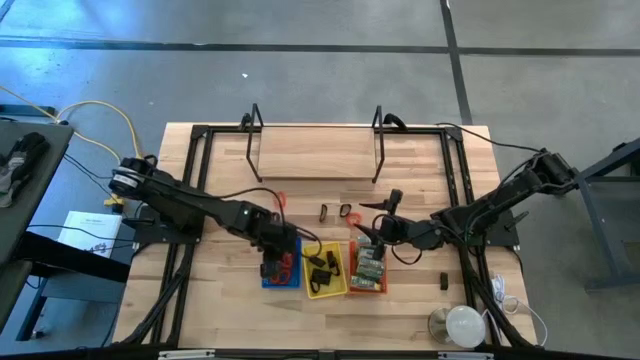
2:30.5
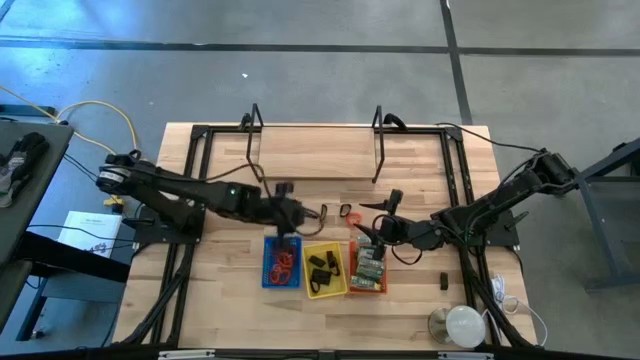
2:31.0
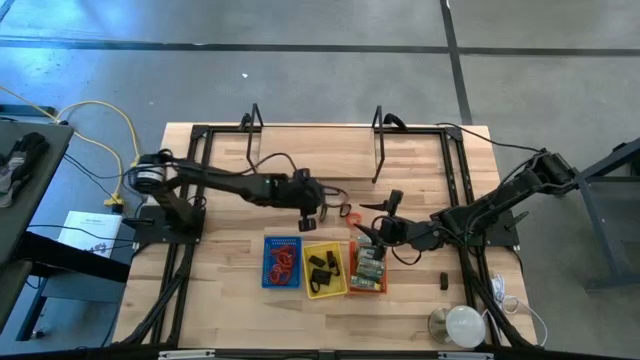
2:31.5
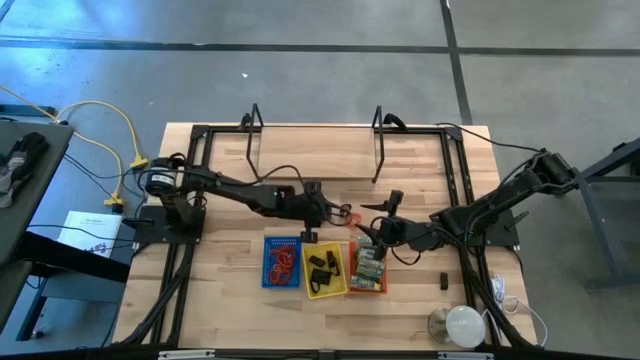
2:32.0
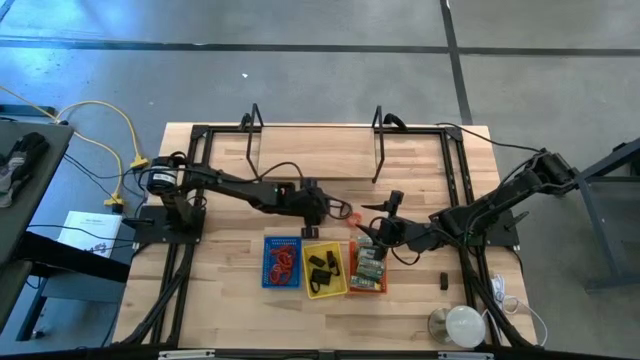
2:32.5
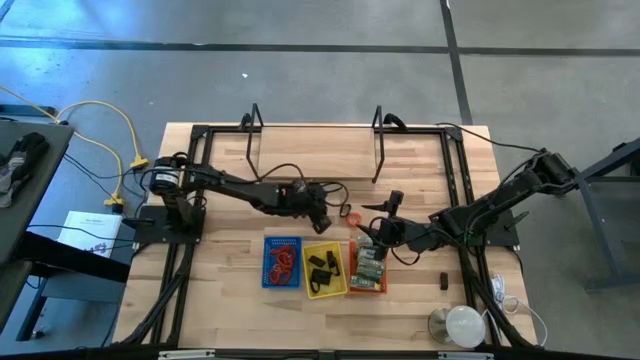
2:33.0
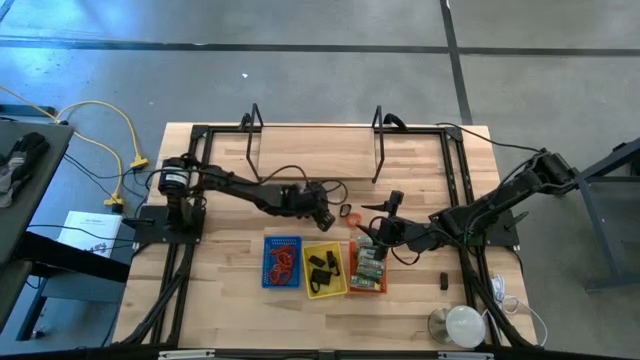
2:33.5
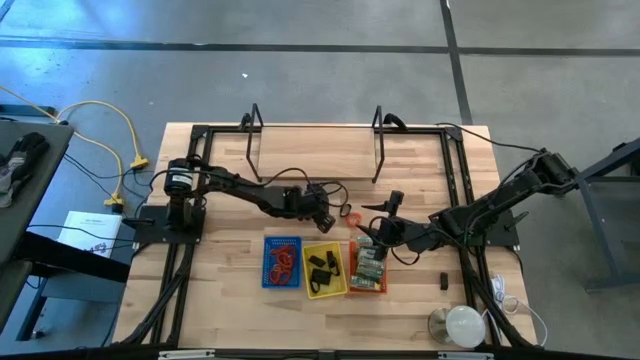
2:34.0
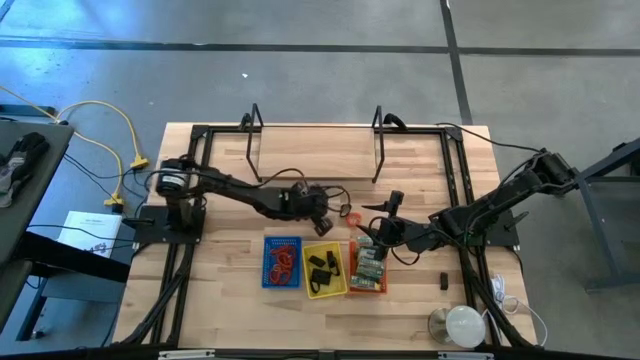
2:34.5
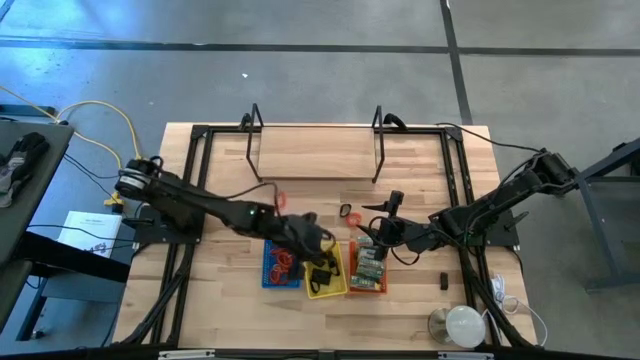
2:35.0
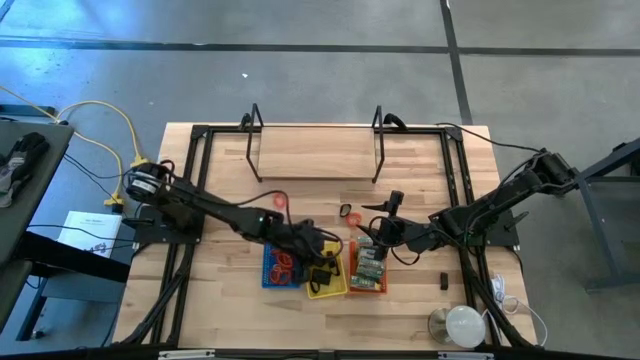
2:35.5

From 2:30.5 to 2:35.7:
Task: Pick & Place Office Desk Supplies
Put the black rubber band into the yellow basket

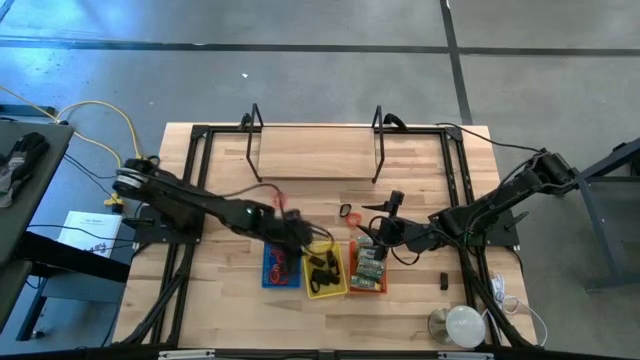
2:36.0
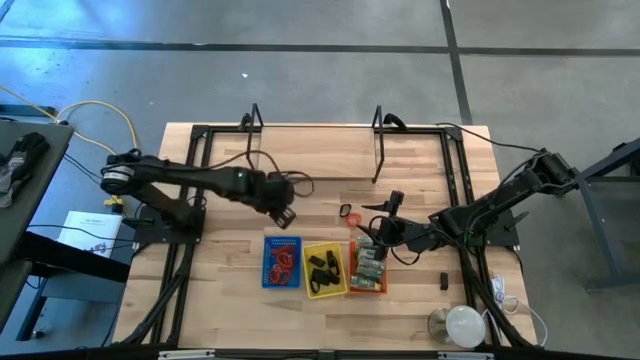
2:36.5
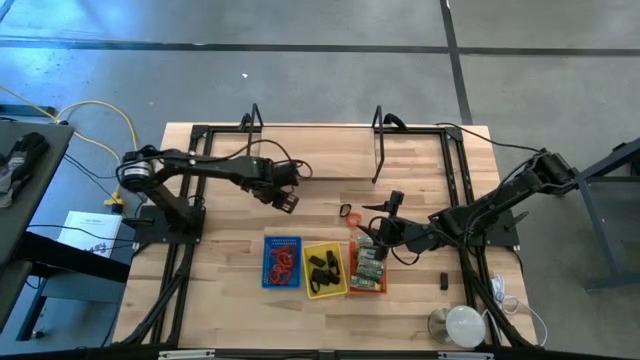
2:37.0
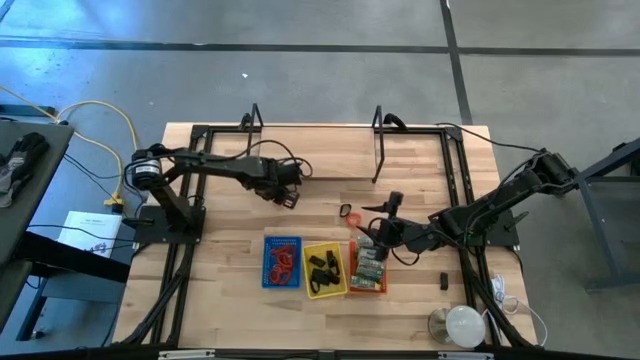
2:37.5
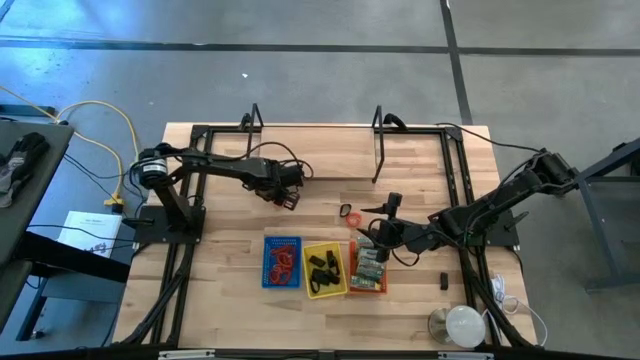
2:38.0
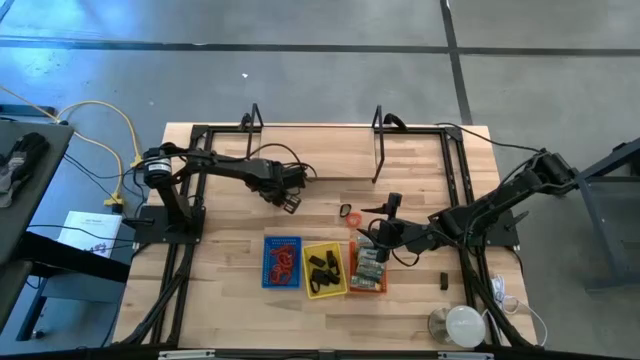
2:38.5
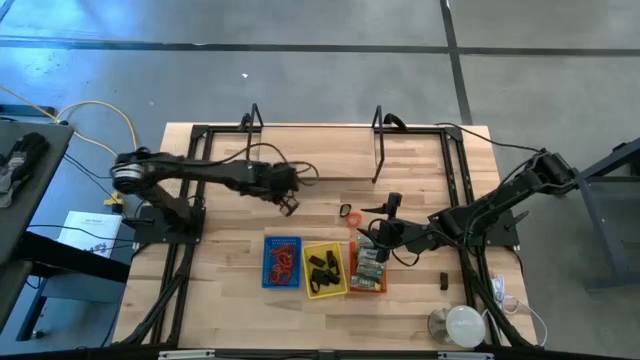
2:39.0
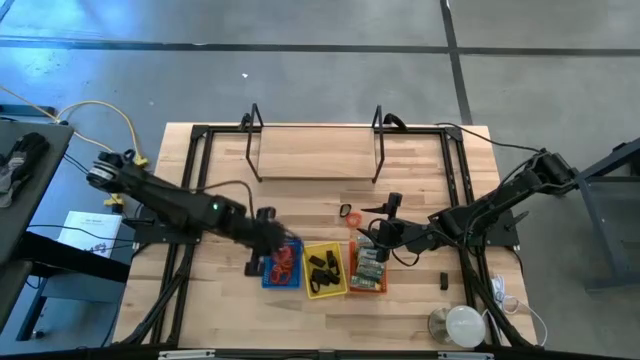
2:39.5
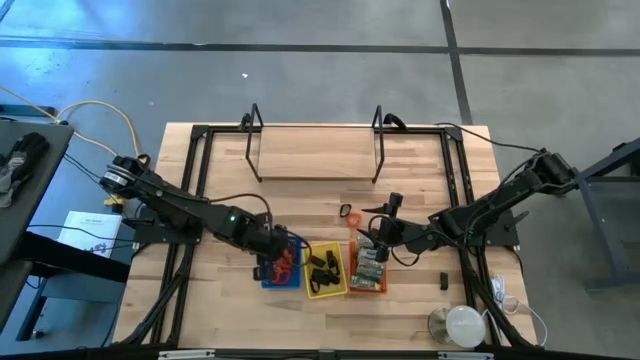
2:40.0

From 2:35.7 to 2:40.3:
Put the spring keychain into the blue basket

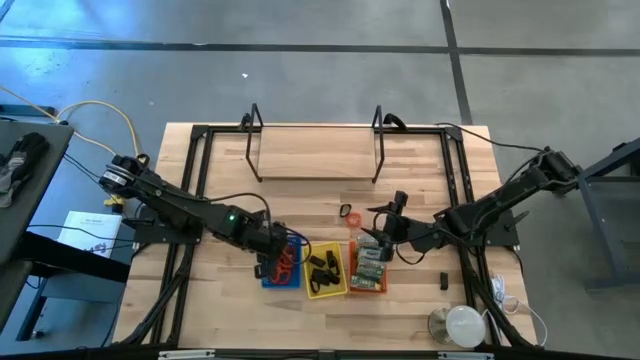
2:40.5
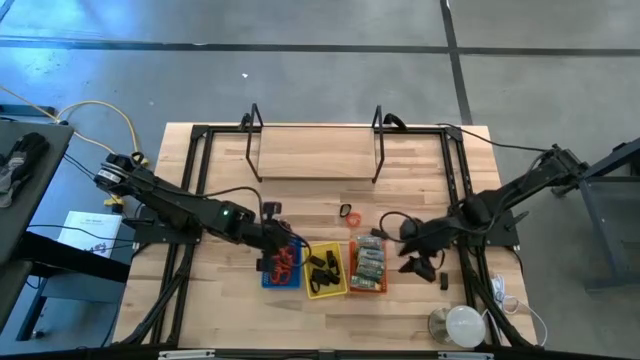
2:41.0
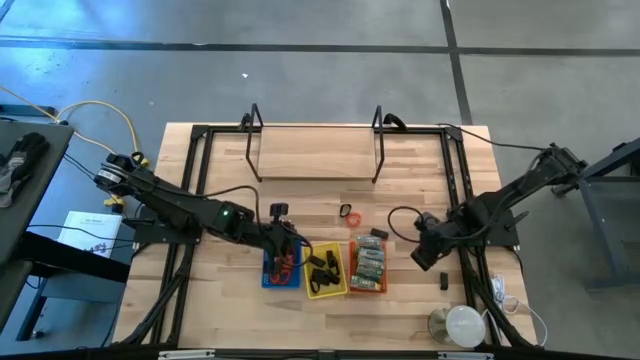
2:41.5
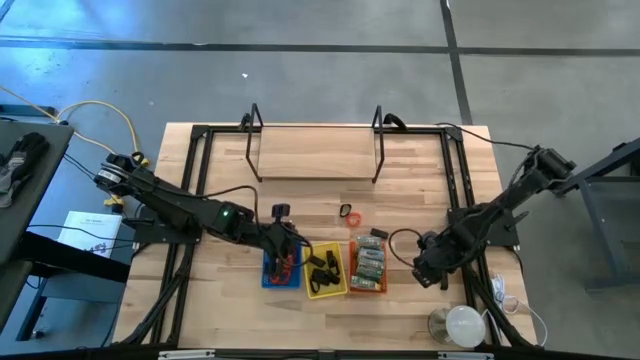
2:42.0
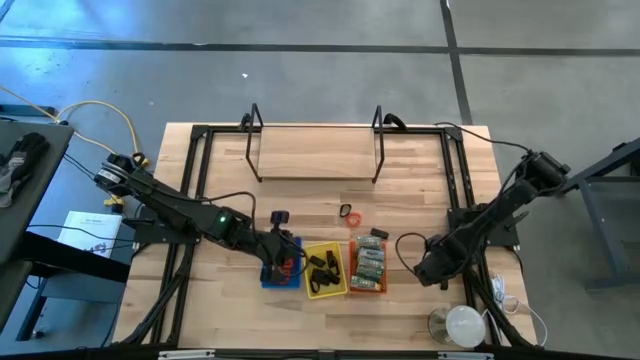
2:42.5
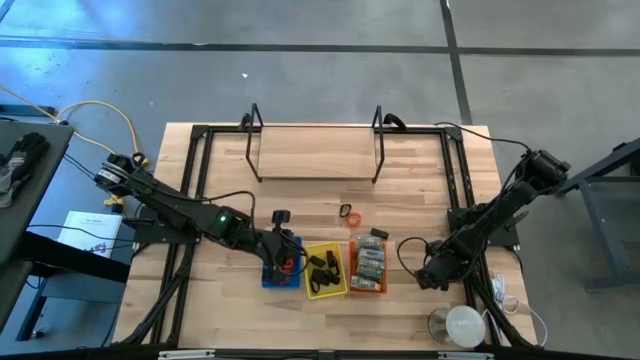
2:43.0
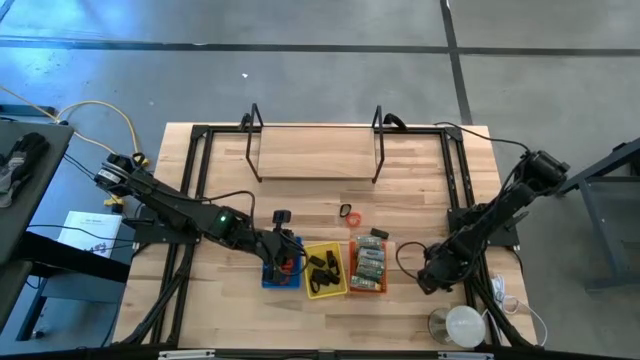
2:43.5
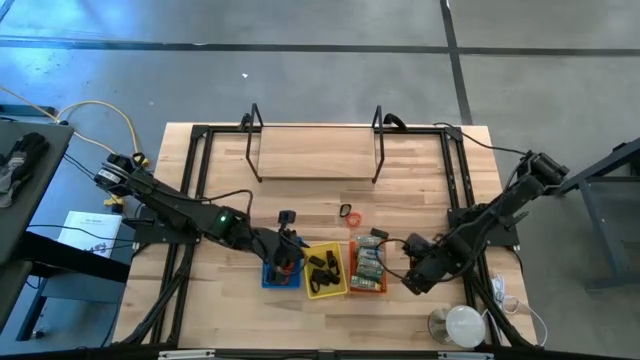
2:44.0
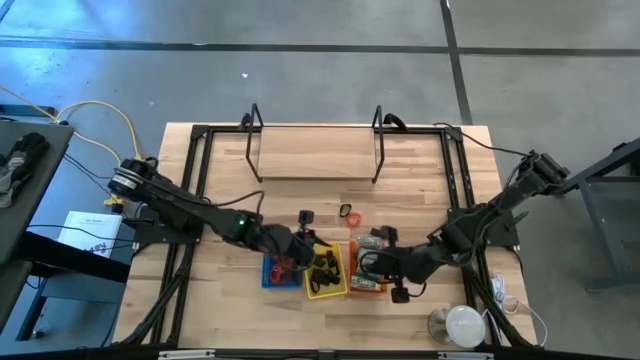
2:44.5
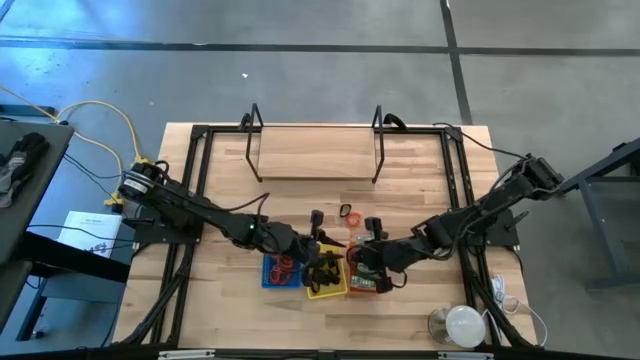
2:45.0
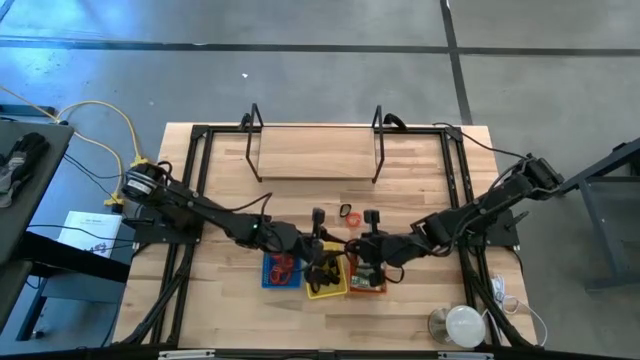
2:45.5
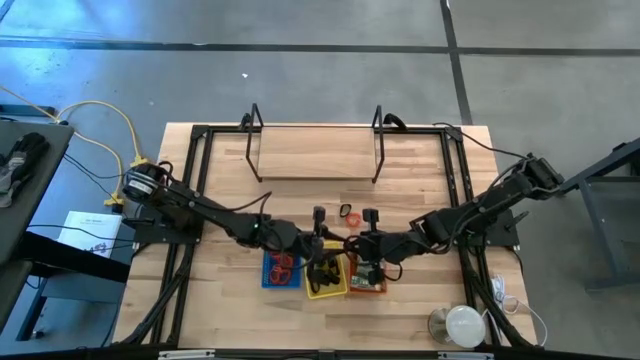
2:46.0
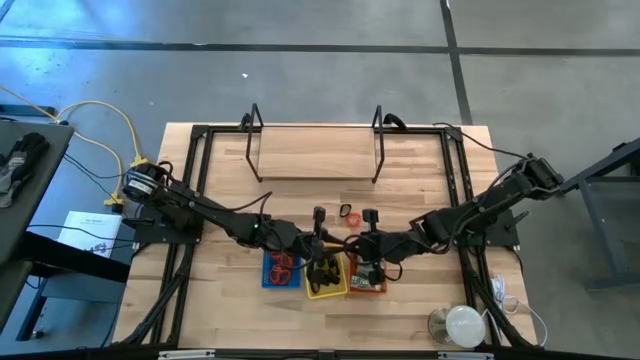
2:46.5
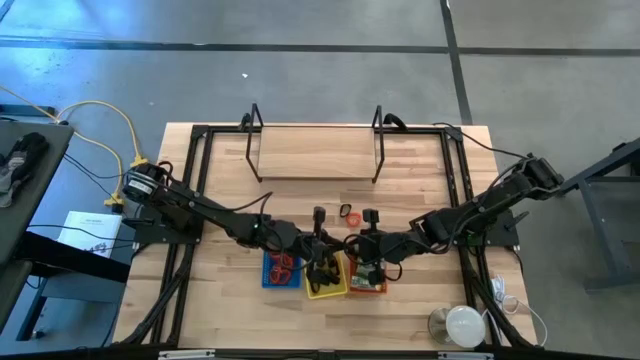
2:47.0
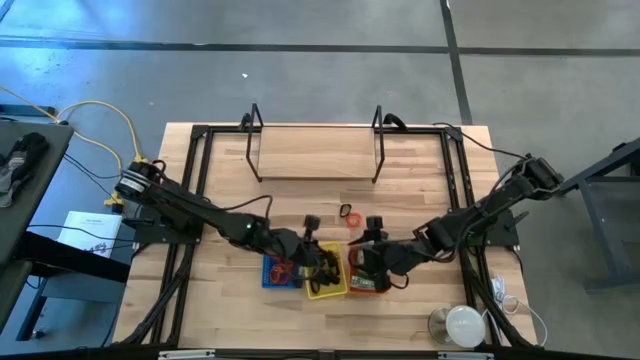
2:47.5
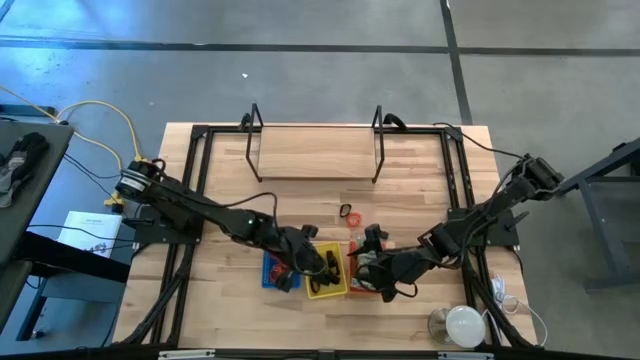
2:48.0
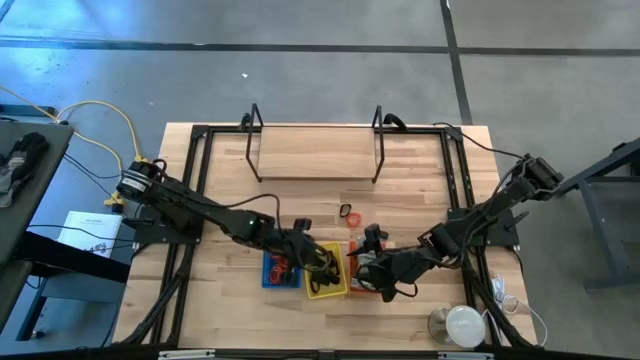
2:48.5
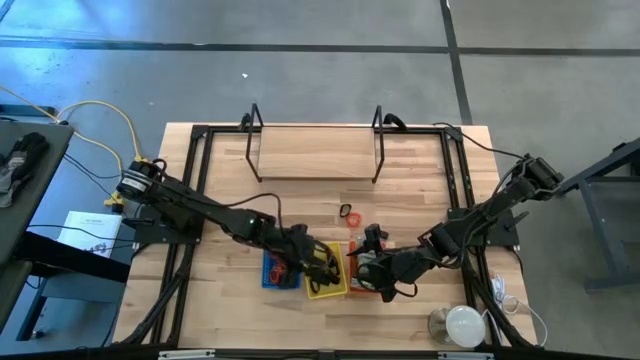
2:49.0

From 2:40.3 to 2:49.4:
Put the black rubber band into the yellow basket

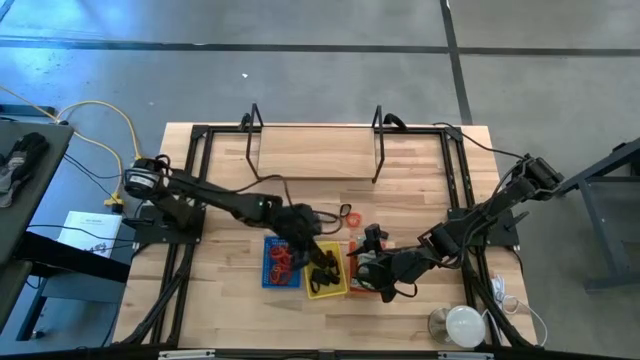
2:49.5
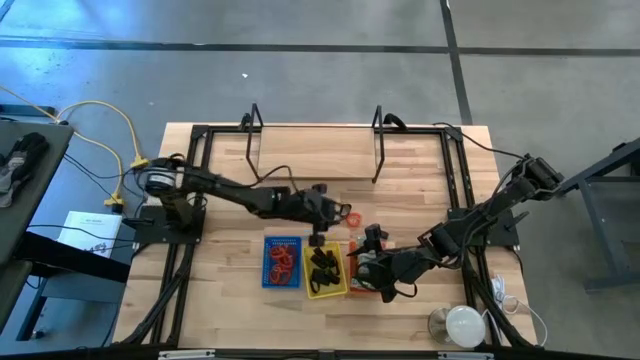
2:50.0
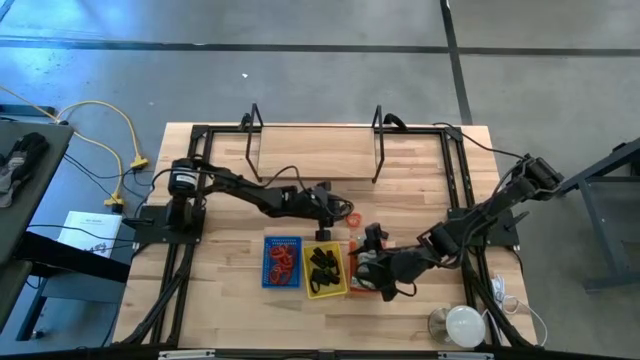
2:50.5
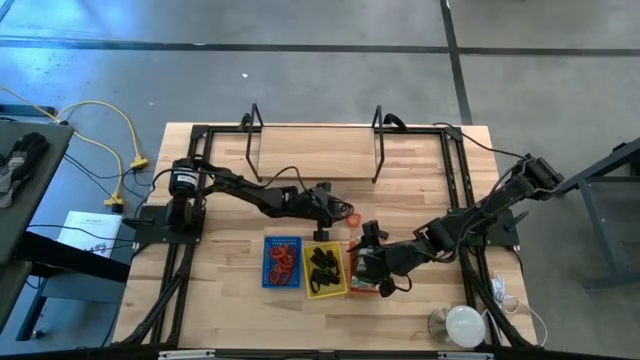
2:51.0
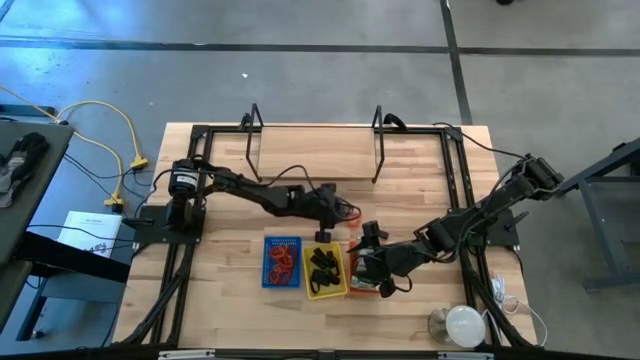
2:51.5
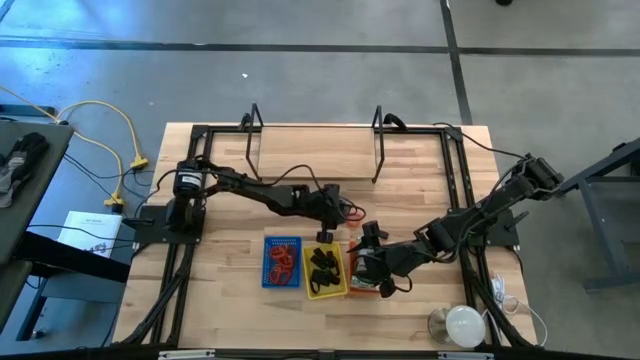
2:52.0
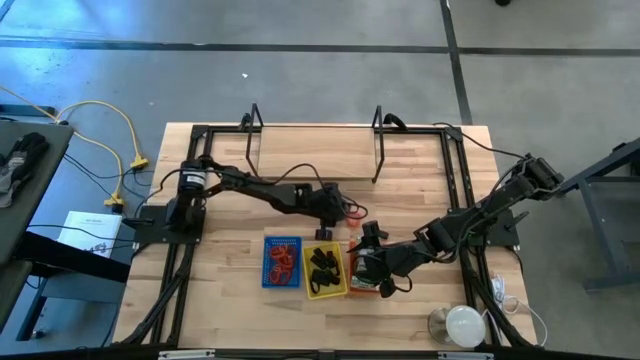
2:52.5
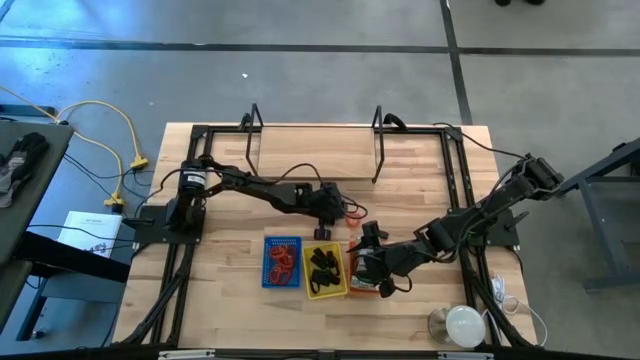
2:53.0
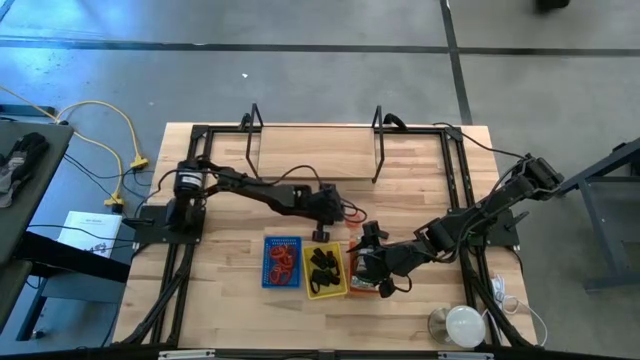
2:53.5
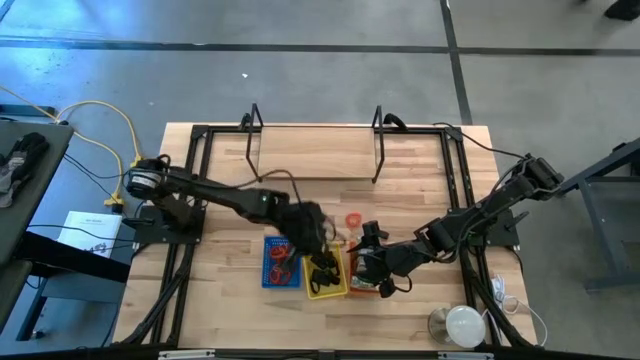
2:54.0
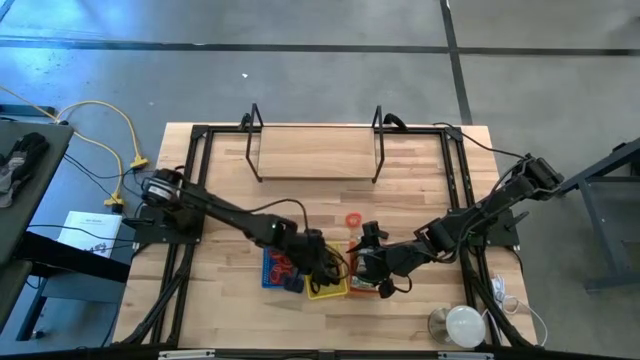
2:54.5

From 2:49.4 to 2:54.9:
Put the black rubber band into the yellow basket
